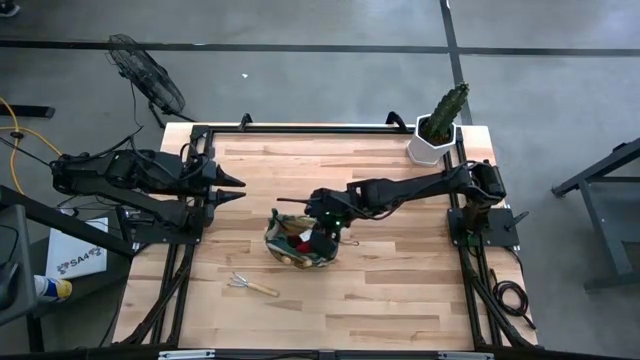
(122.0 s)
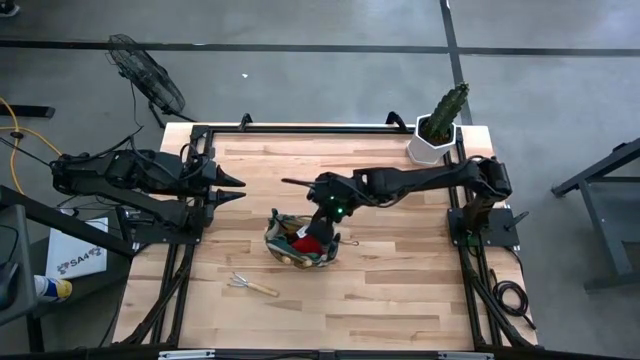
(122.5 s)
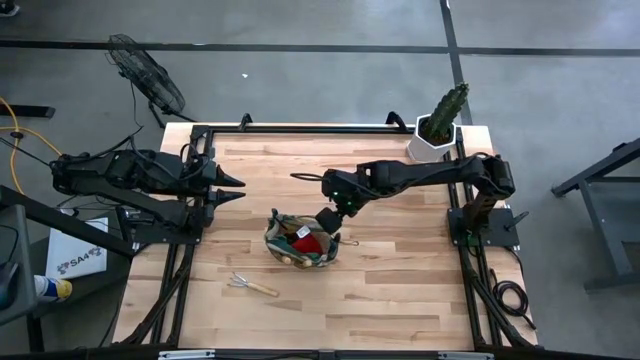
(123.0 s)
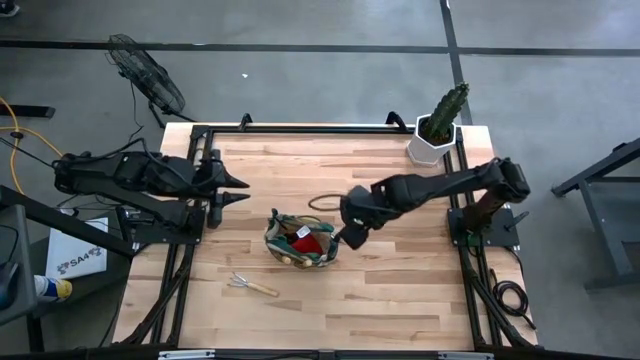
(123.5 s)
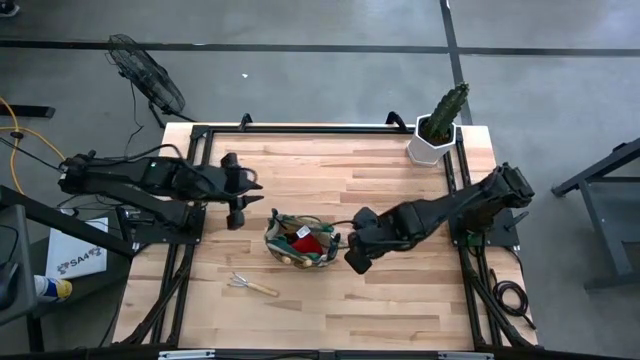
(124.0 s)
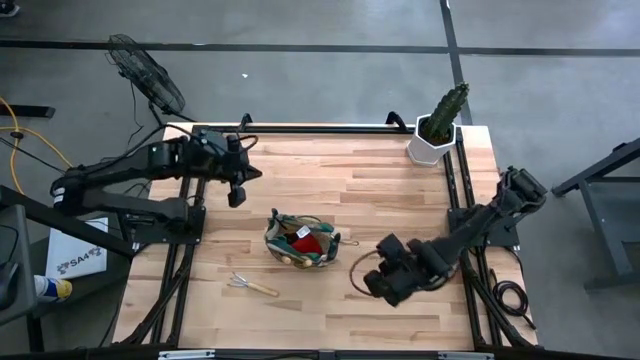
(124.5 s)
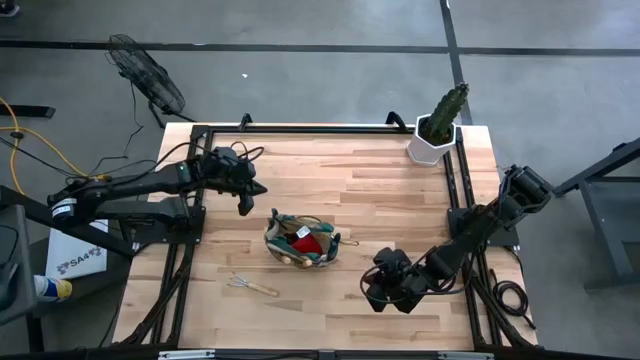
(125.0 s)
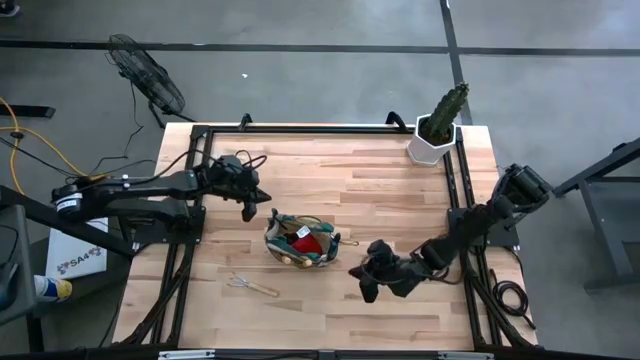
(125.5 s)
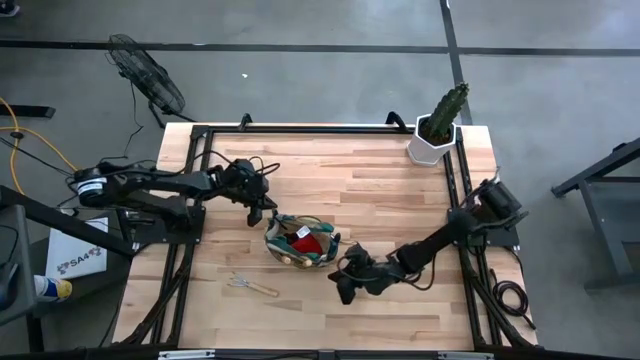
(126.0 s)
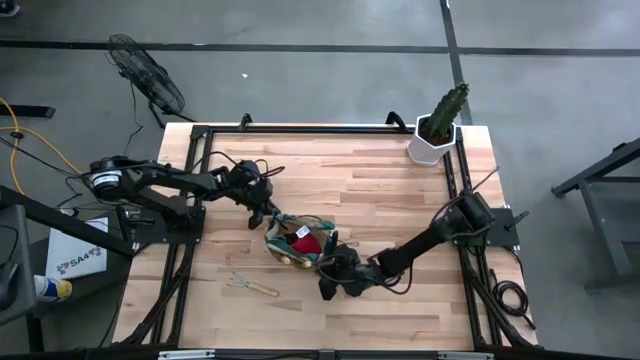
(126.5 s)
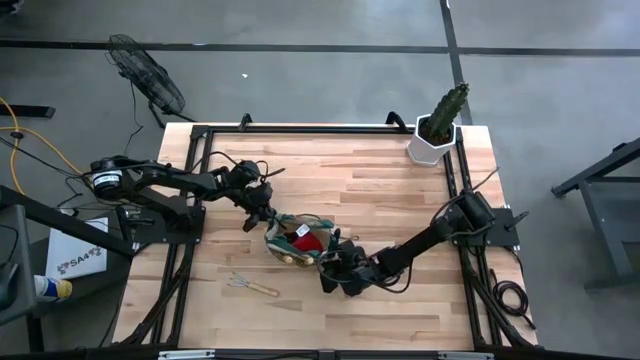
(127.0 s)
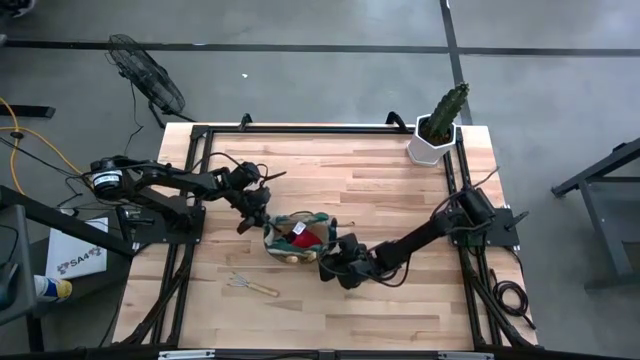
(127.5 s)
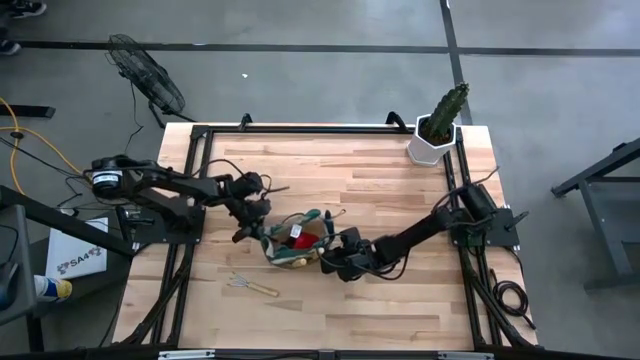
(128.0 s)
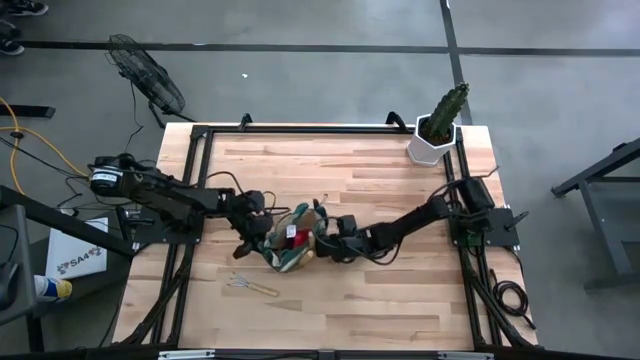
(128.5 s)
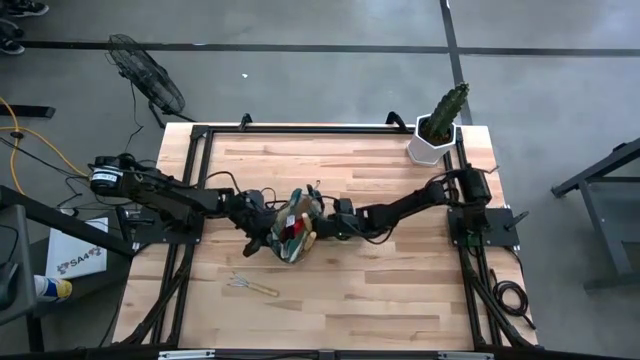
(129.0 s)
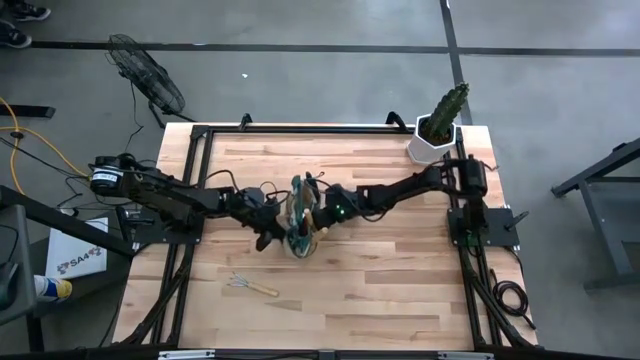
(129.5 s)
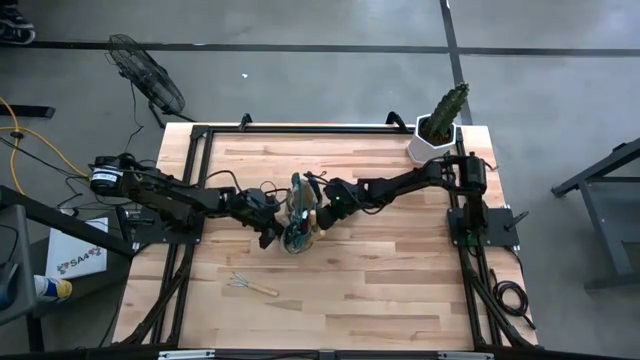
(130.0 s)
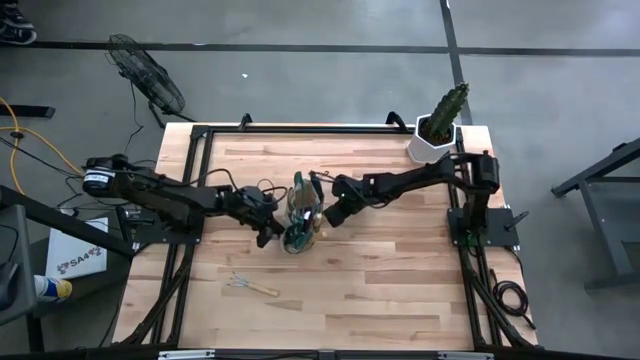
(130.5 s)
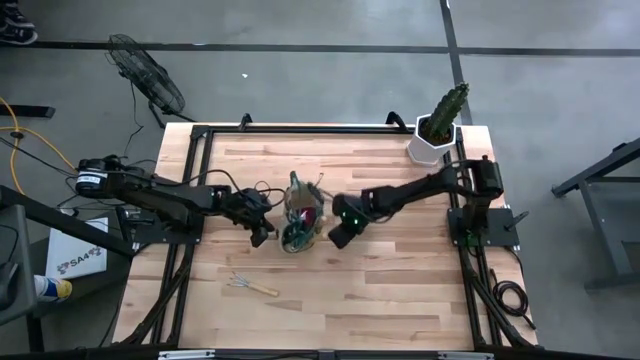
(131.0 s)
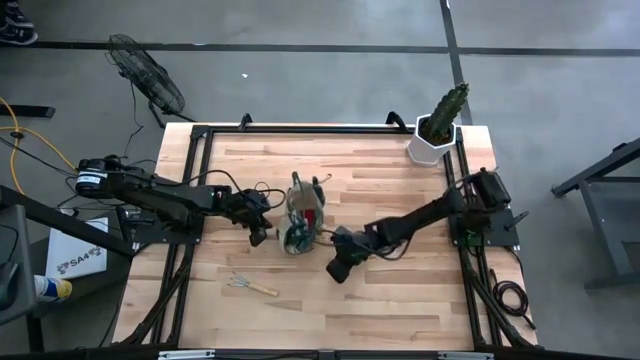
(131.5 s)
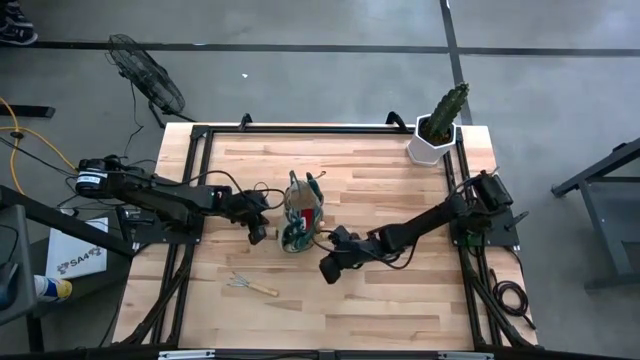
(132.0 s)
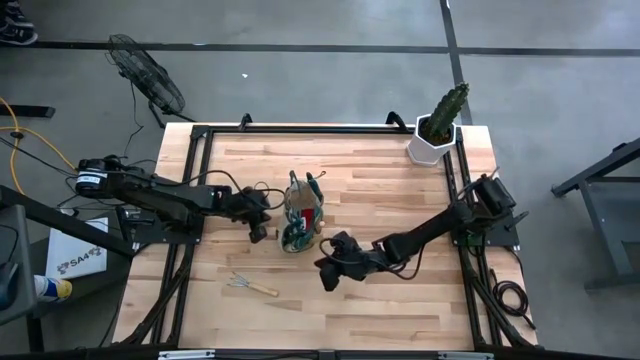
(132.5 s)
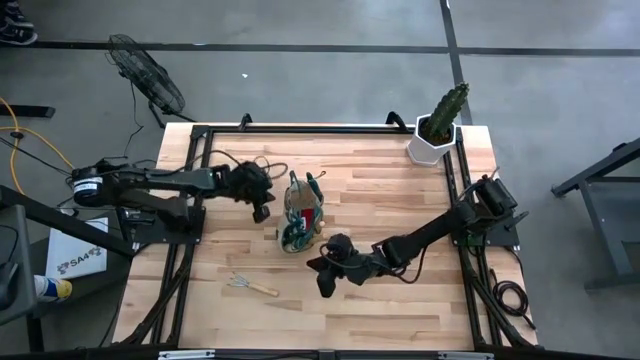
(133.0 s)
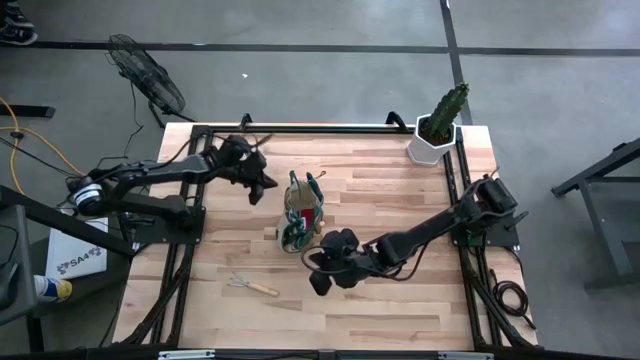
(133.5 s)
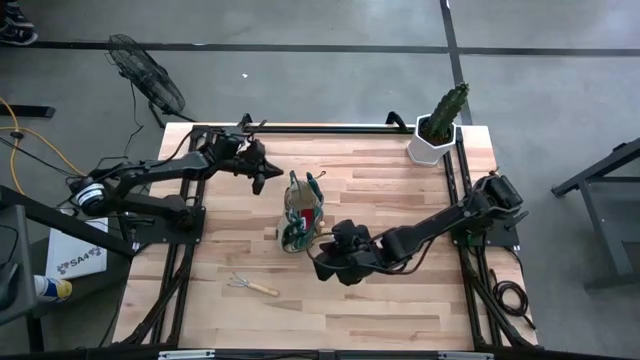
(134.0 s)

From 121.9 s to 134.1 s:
Task: Pick & Place Garden tools in Gardening bag
Adjust the gardening bag on the table

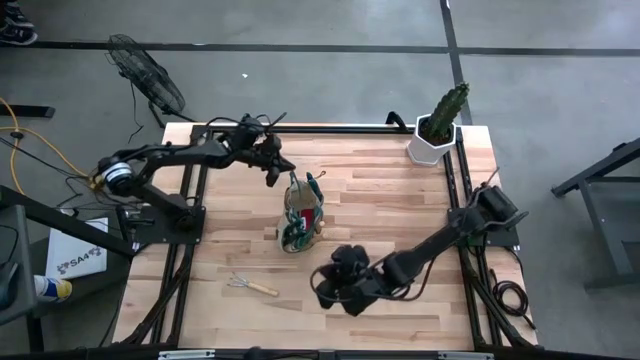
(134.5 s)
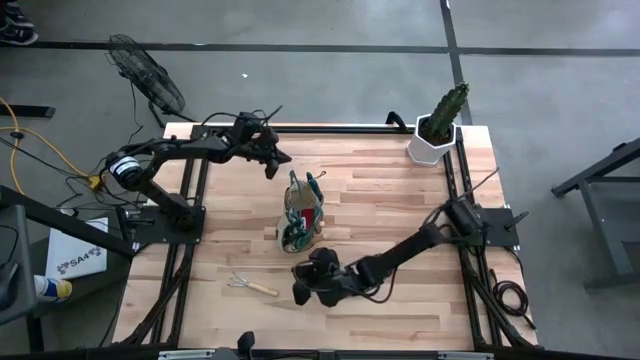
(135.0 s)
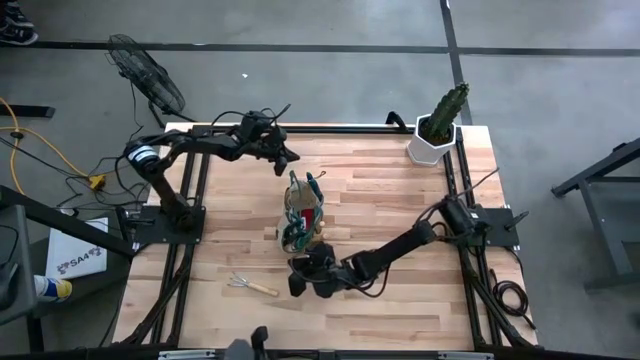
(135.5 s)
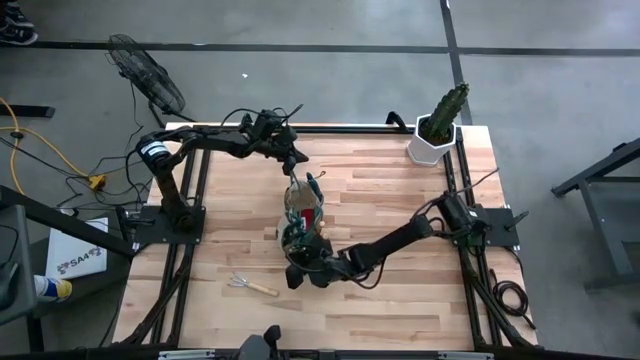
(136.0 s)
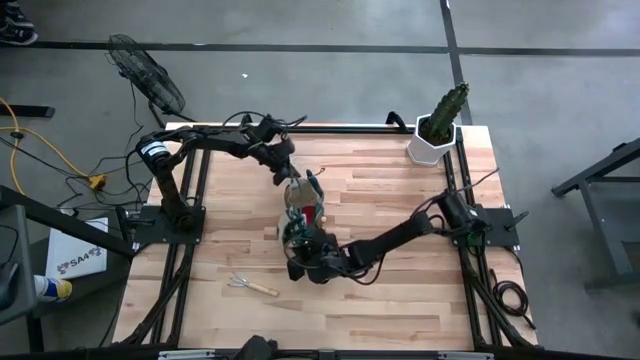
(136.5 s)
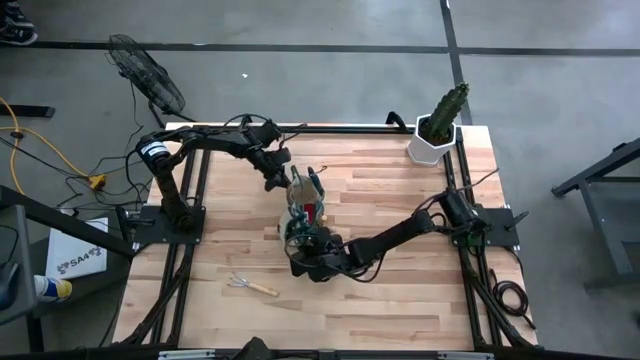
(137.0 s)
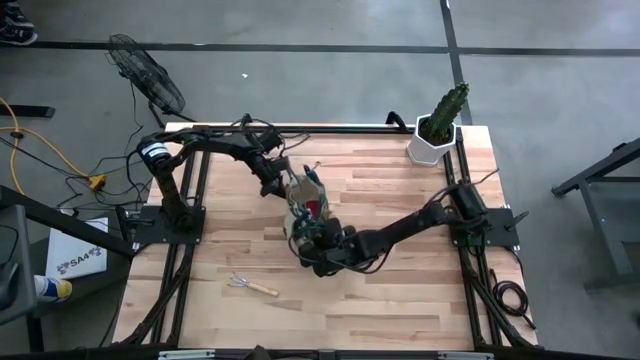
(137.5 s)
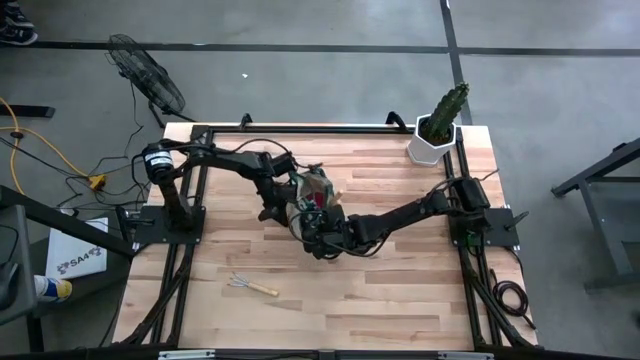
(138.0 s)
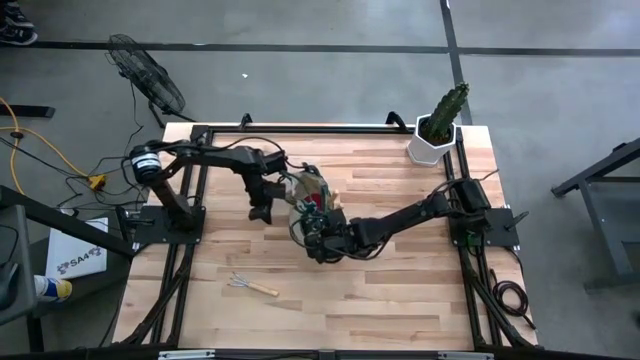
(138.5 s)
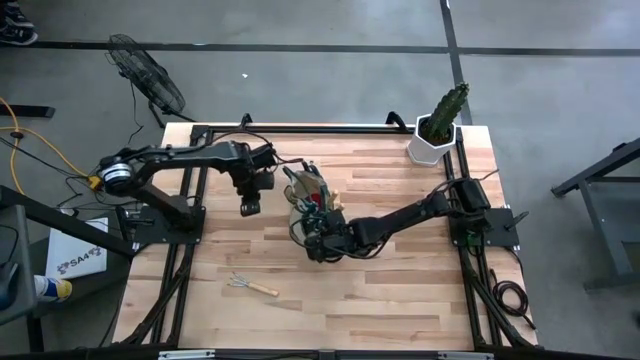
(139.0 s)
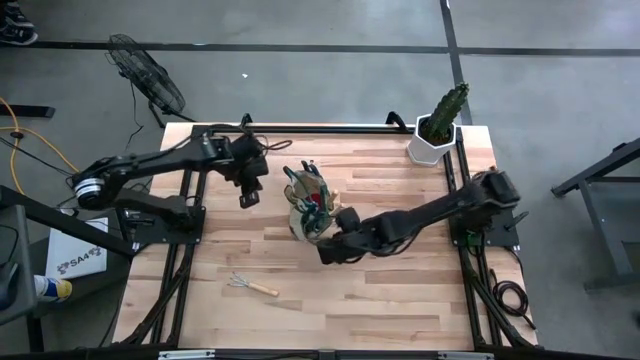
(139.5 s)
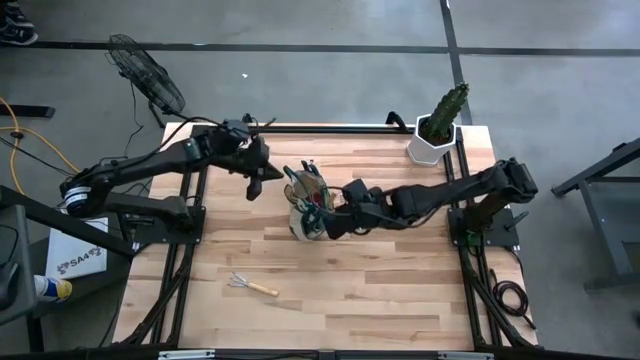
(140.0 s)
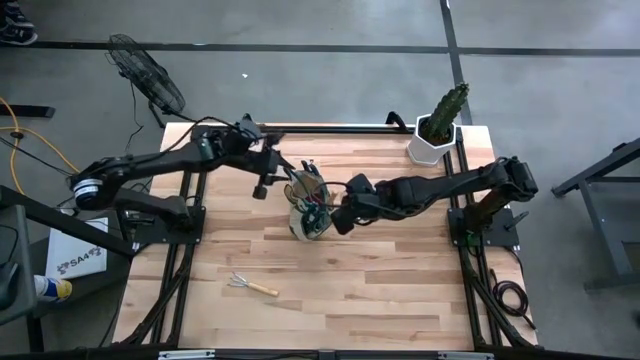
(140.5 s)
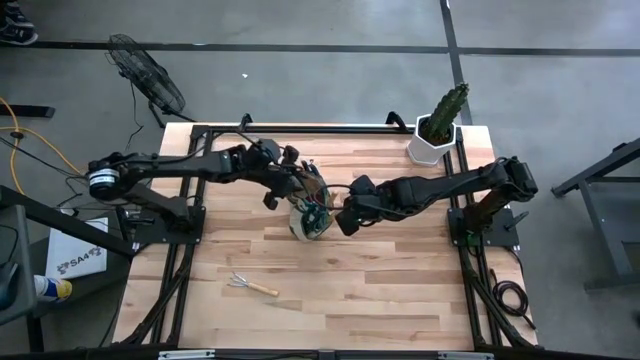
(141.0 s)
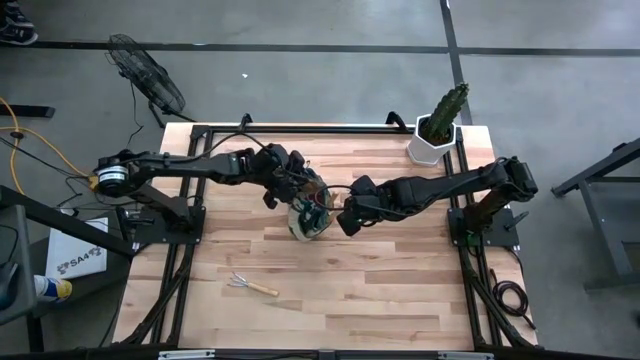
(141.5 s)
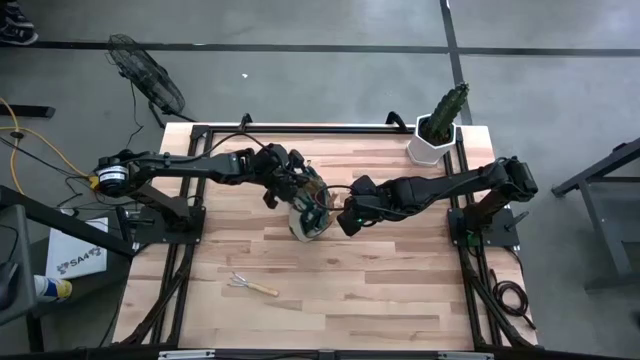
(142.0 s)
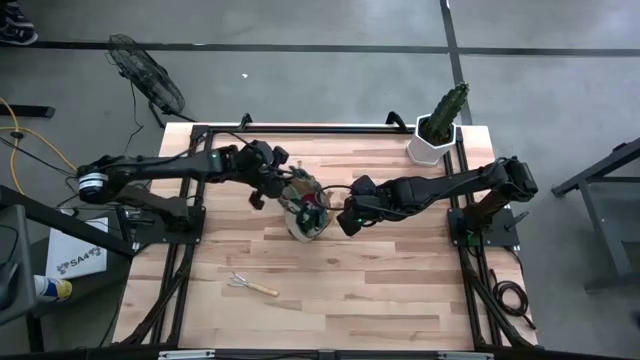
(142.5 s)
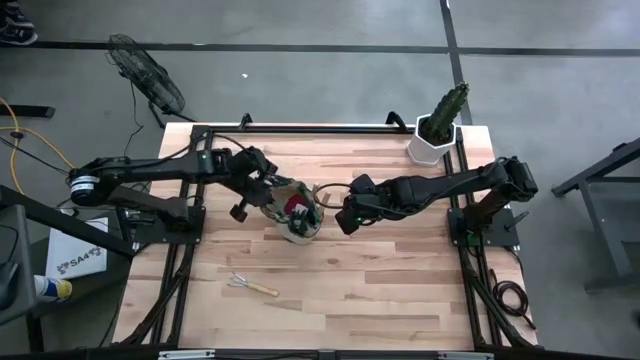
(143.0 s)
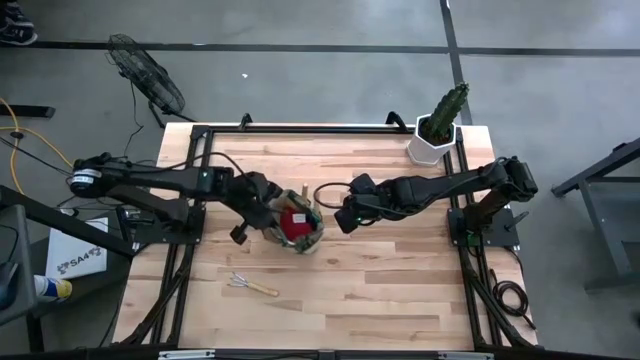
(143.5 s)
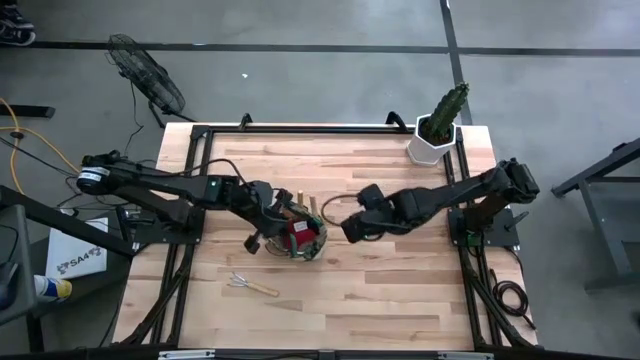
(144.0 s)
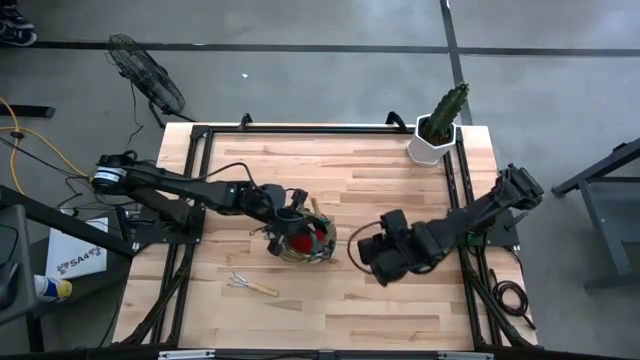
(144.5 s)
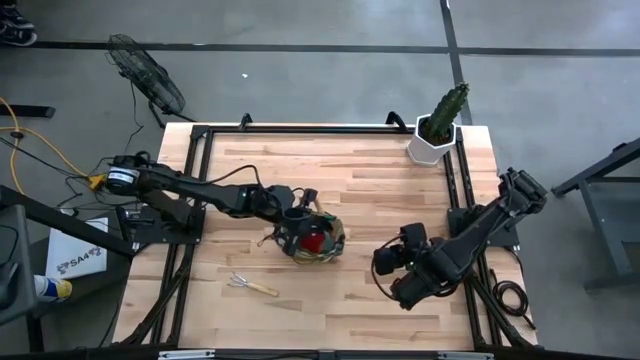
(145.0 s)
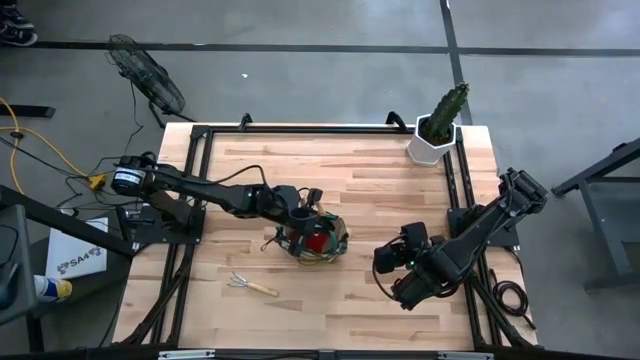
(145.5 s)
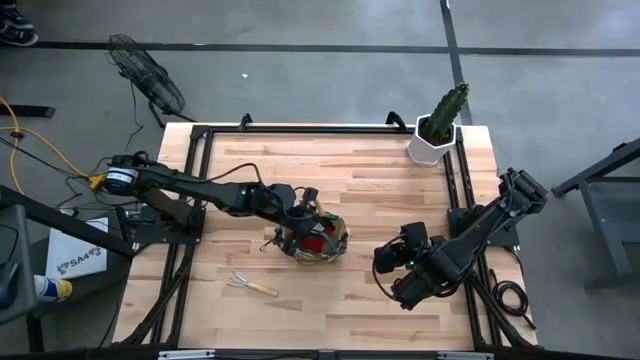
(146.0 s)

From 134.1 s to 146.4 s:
Adjust the gardening bag on the table
